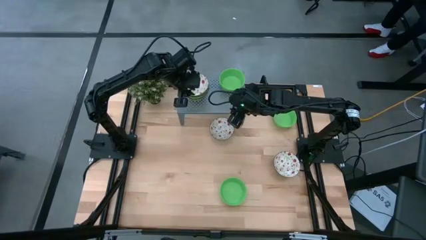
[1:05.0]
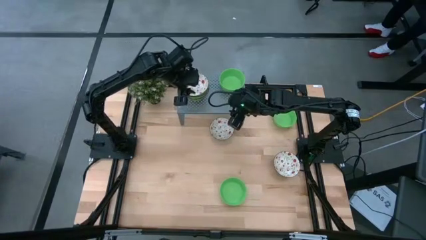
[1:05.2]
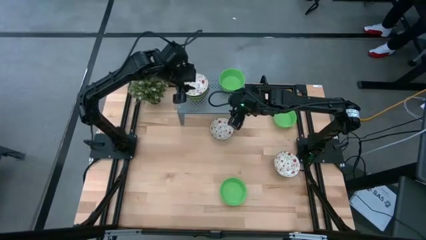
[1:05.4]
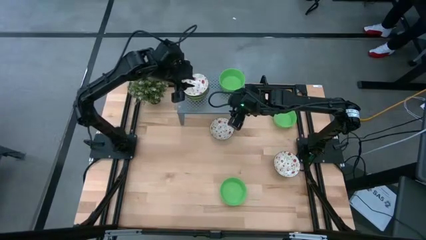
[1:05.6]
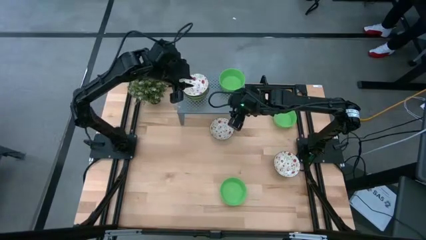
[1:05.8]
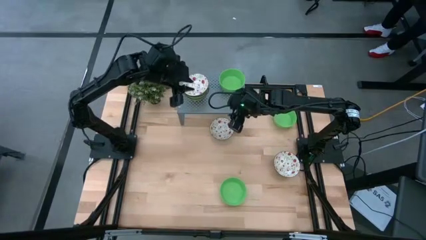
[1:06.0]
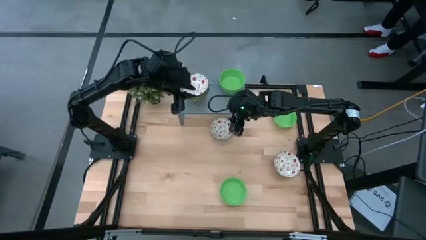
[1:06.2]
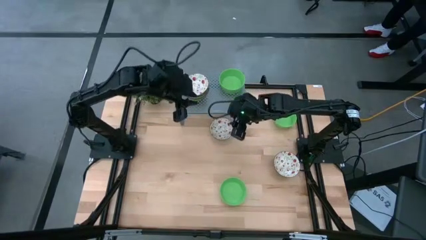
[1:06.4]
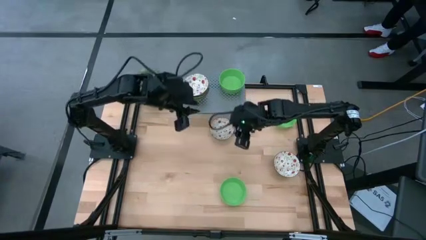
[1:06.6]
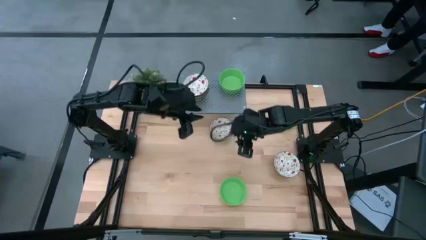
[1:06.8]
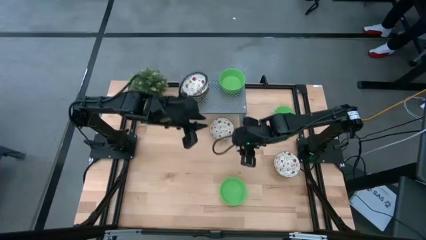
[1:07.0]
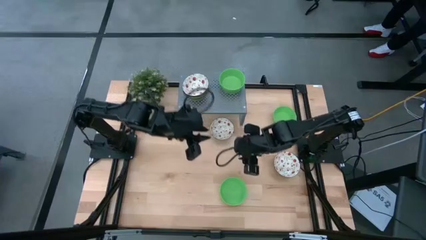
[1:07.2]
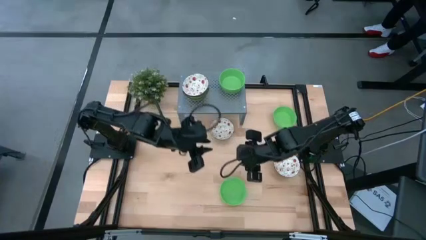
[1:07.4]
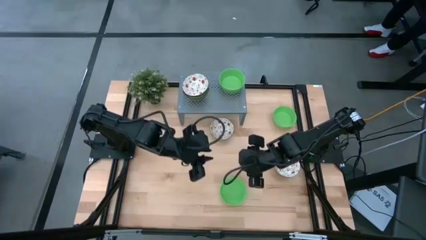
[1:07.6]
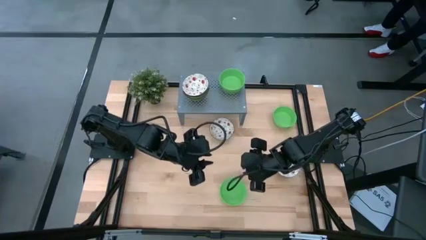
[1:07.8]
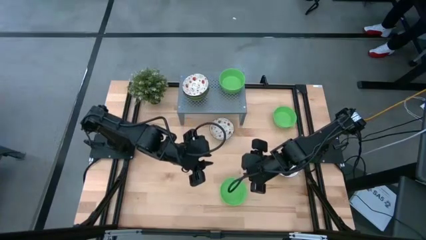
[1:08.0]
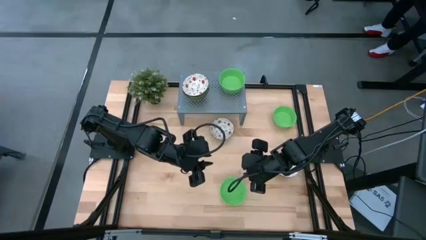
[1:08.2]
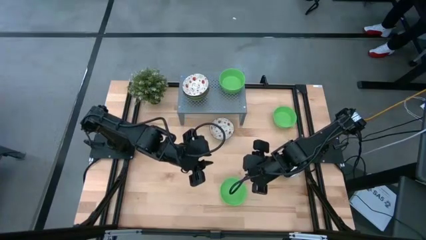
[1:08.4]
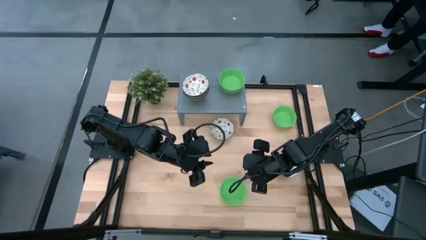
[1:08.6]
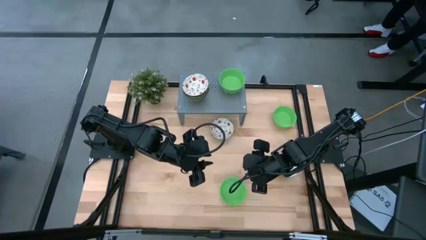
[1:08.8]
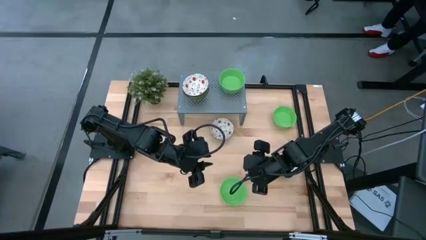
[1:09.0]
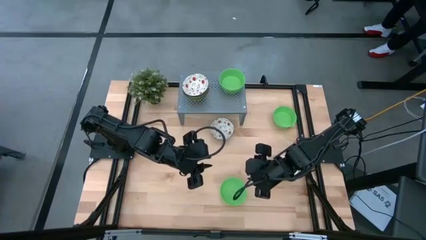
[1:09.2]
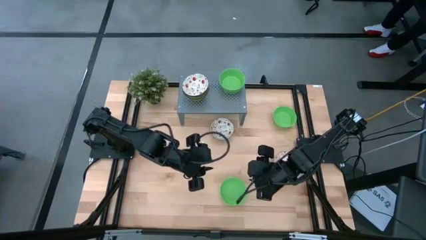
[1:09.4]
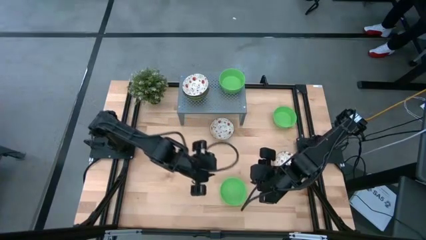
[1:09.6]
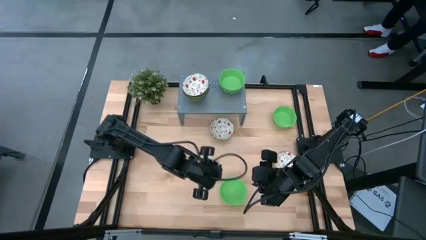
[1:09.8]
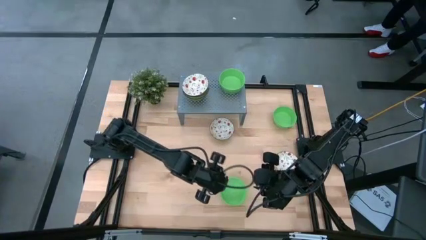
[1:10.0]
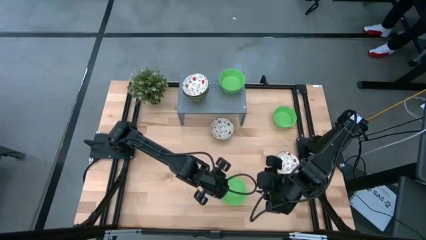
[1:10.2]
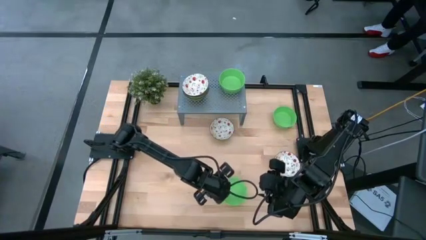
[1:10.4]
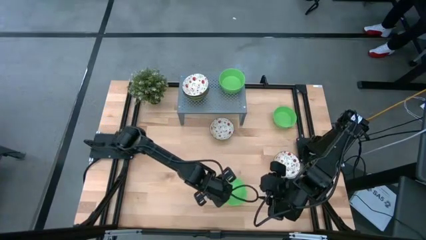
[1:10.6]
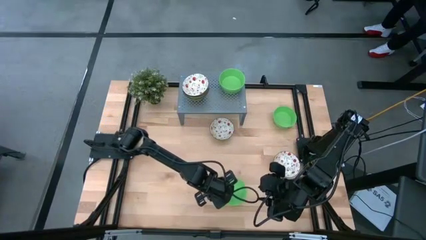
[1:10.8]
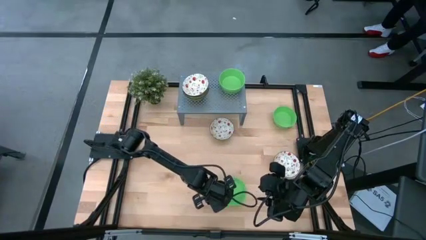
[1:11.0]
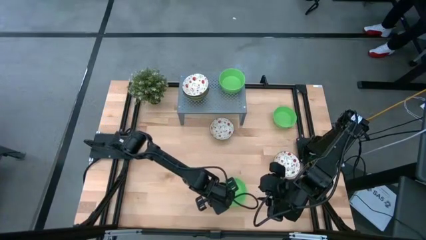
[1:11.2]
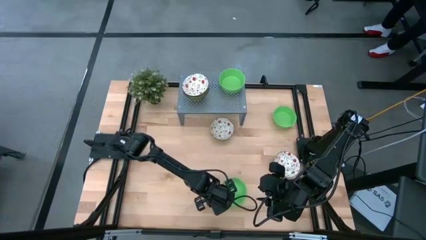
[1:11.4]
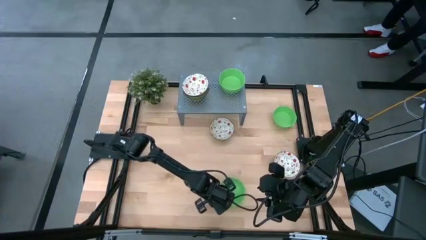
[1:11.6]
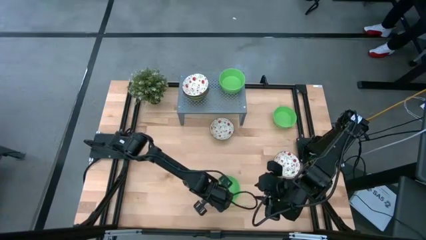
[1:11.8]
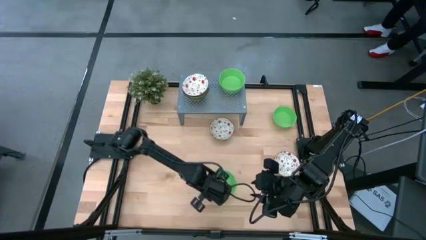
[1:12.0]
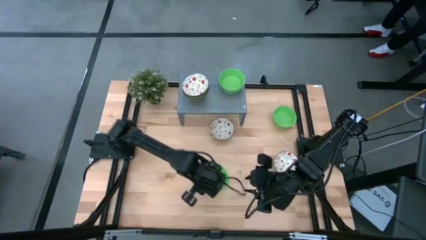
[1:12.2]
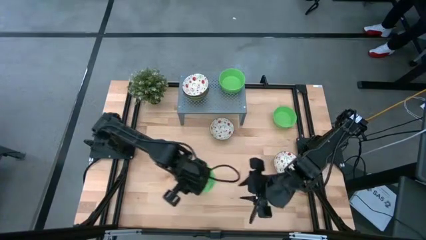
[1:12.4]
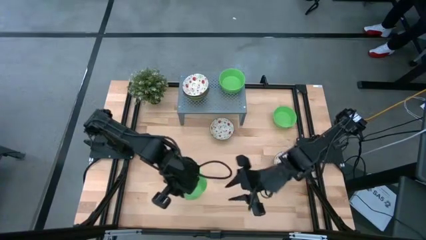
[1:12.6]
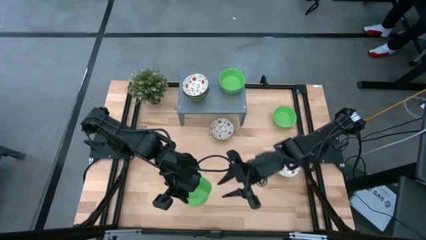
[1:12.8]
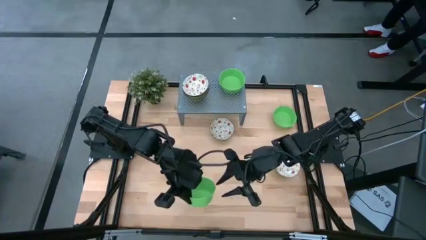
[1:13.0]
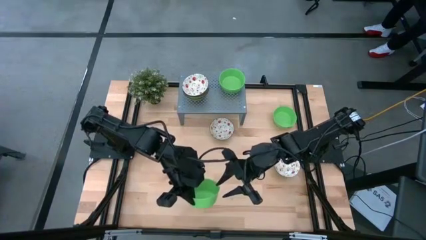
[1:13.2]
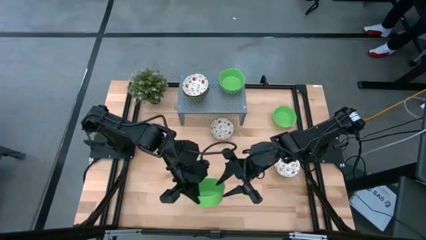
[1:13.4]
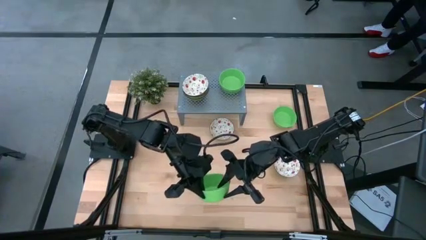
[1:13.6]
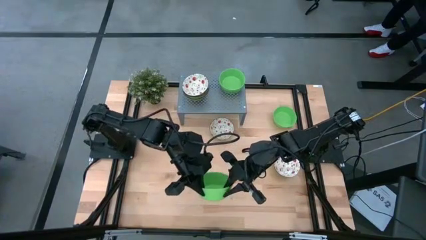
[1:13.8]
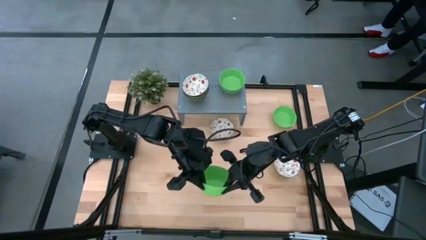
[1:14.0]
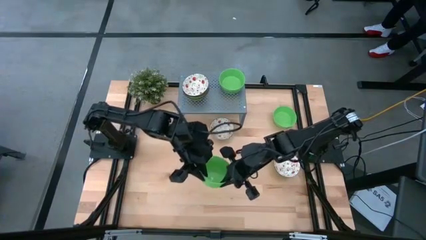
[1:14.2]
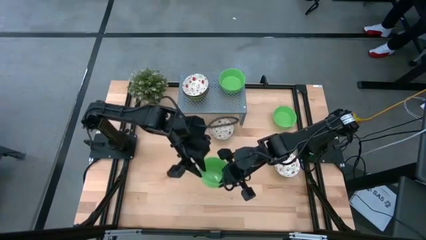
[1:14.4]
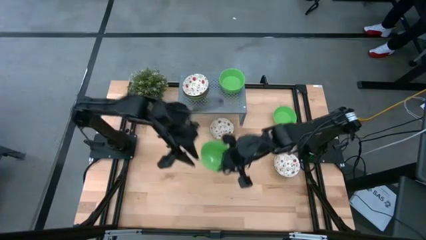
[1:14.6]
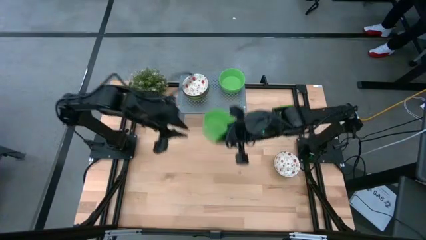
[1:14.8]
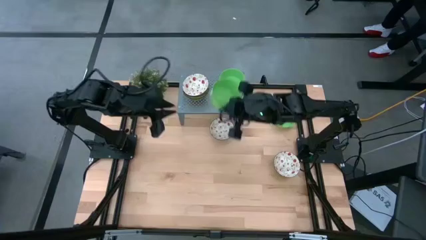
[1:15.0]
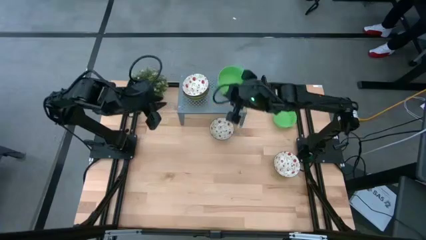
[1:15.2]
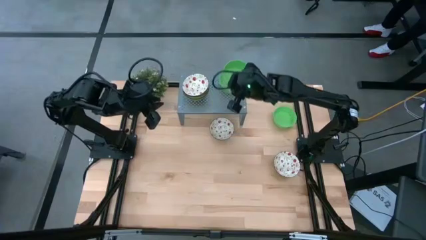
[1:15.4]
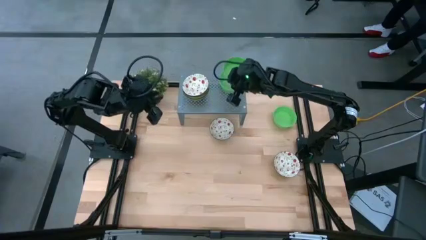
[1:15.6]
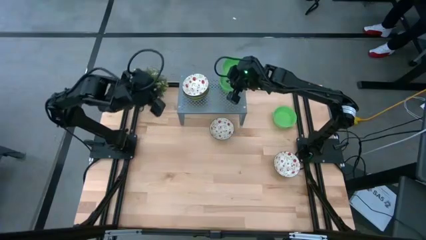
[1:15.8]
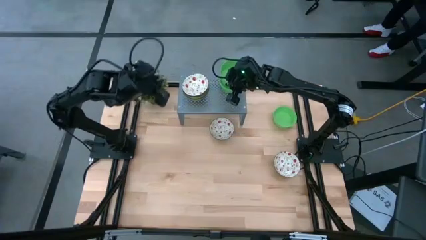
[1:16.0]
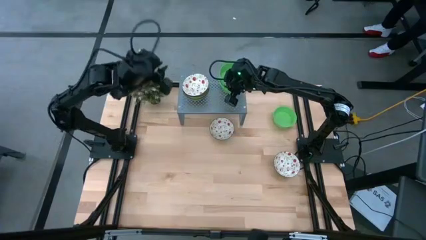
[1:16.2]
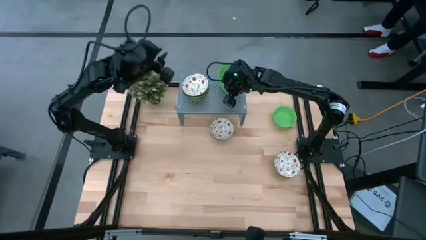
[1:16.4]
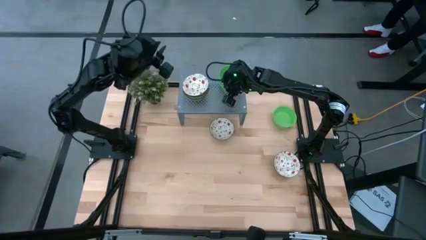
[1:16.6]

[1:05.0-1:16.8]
Task: Pick & Place Mini bowls
Stack the green bowl on the green bowl

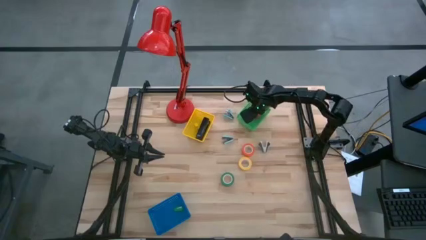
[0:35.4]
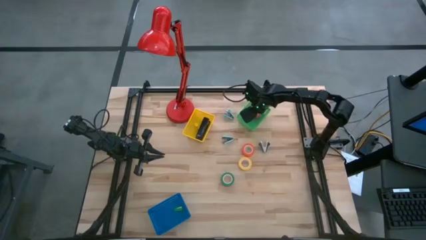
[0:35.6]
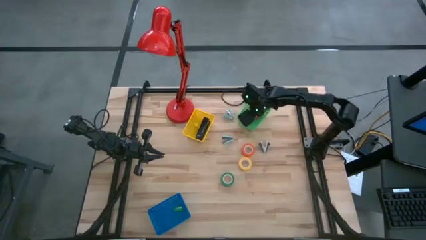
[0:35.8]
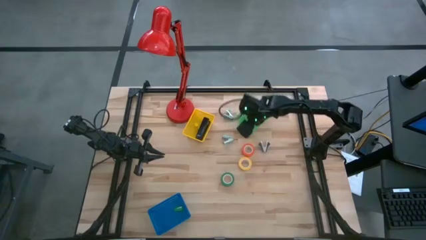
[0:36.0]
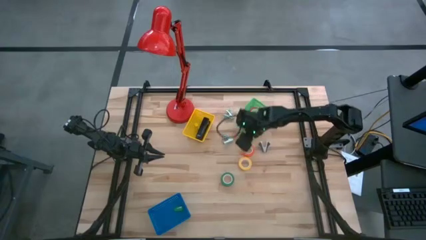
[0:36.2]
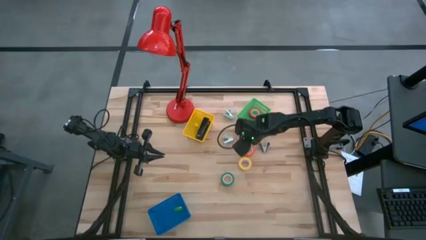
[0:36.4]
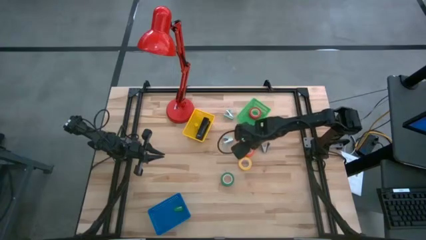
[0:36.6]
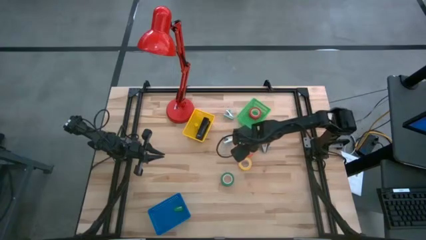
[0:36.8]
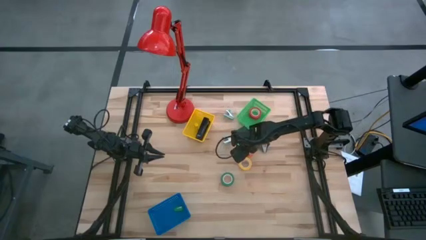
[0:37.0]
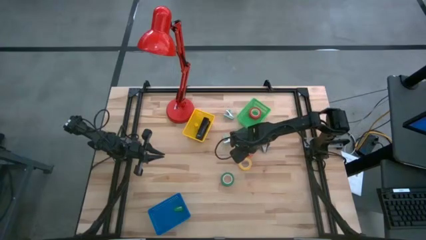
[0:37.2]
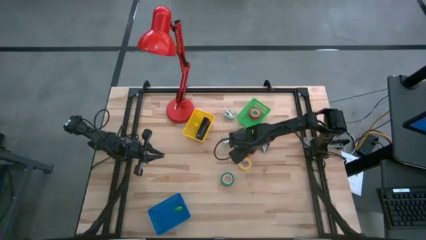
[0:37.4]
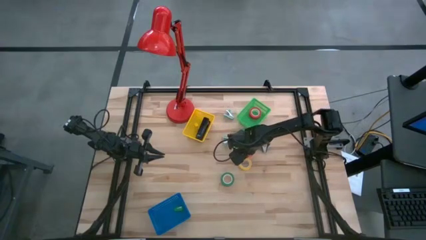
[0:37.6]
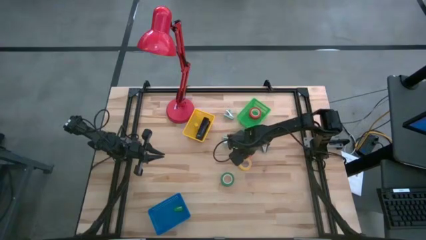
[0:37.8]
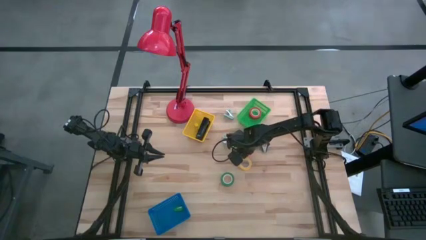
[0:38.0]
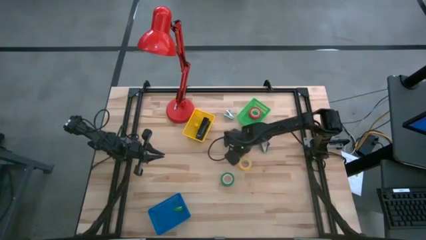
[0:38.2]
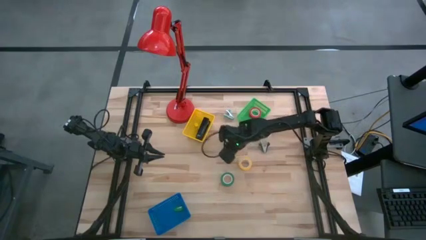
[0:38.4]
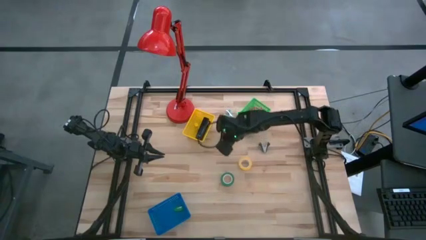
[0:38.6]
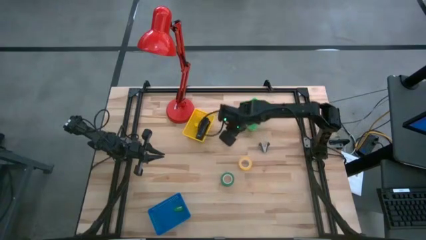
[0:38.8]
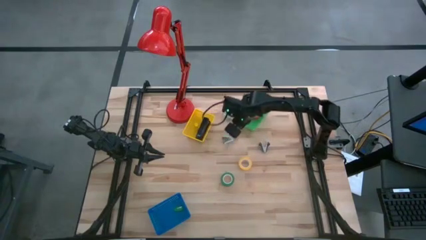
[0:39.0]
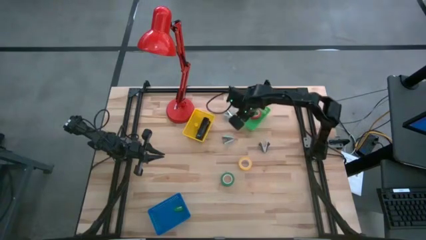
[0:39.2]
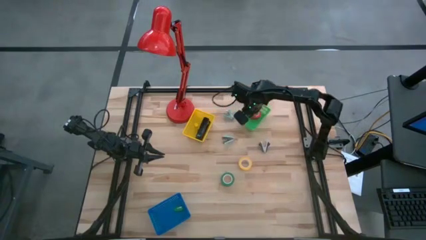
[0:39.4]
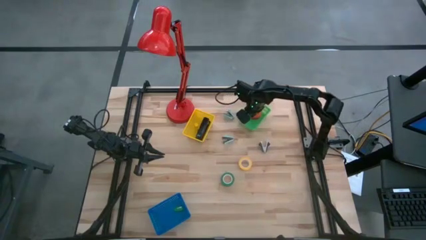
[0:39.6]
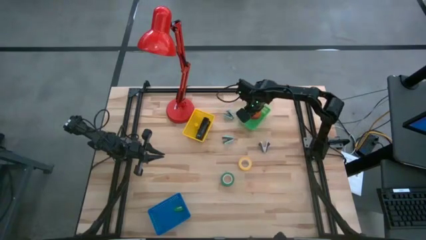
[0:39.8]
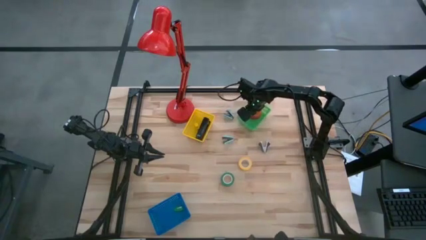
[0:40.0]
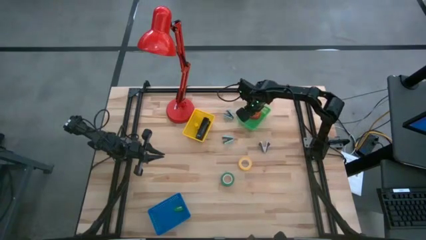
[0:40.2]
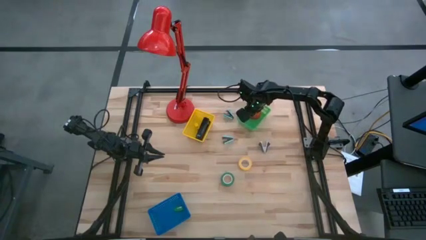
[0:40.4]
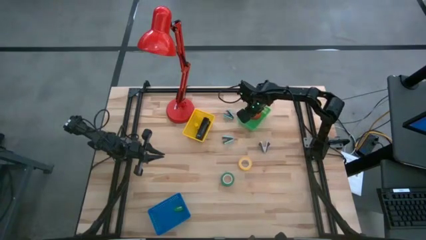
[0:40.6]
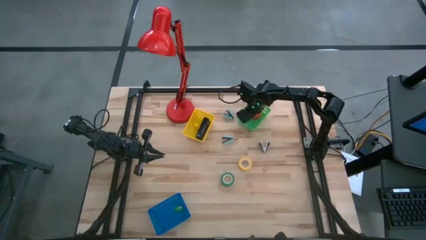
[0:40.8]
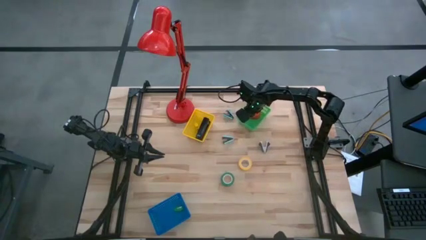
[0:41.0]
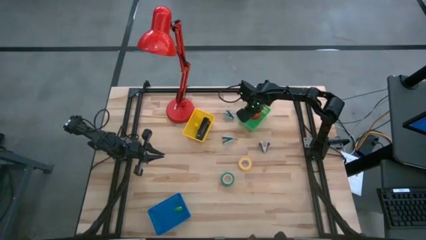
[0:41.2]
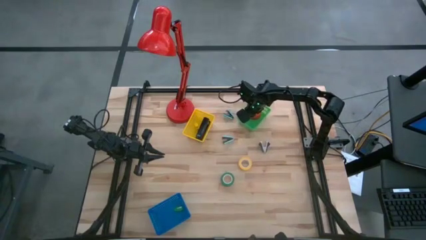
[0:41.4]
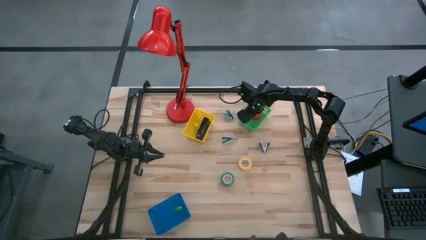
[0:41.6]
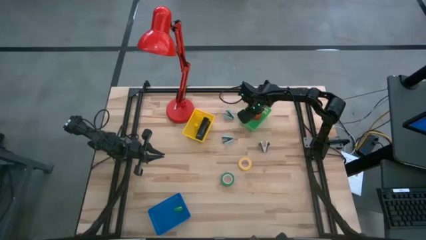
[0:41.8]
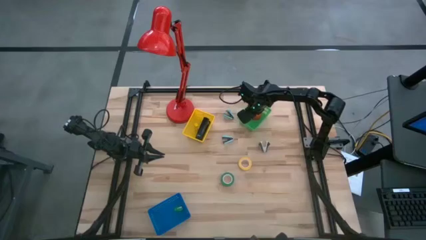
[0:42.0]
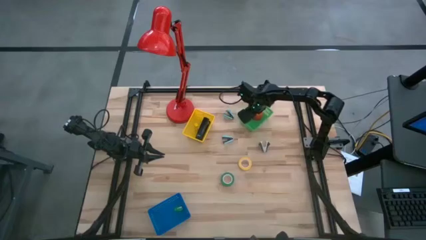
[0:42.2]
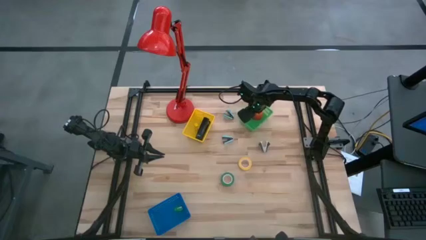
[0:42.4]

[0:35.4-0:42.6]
Task: Pick and place Stapler, Stapler remover, tape
Put the orange tape into the green bin
